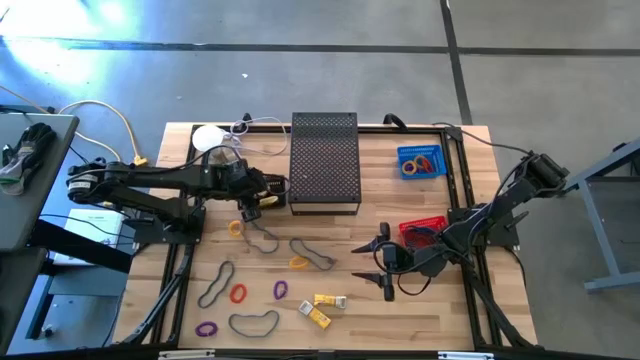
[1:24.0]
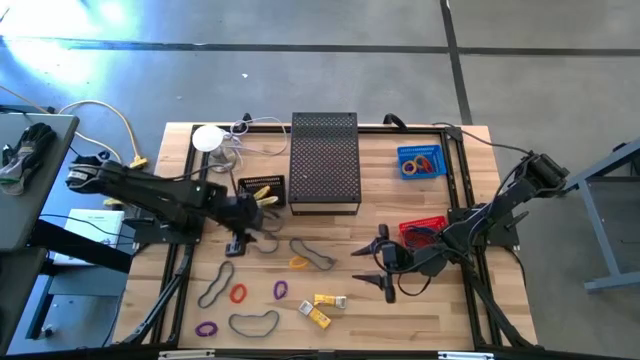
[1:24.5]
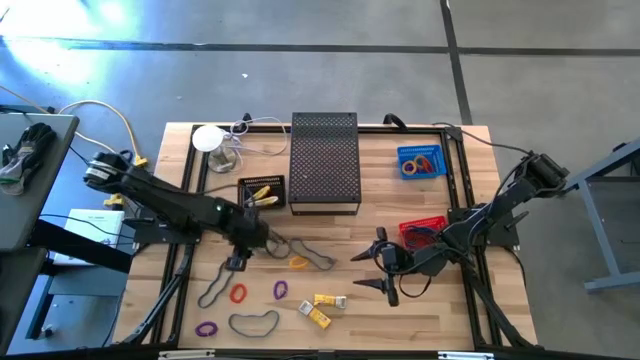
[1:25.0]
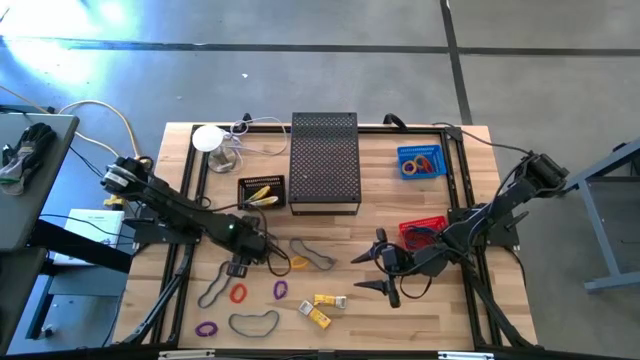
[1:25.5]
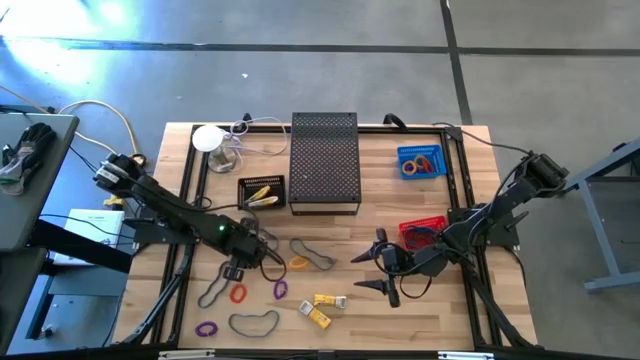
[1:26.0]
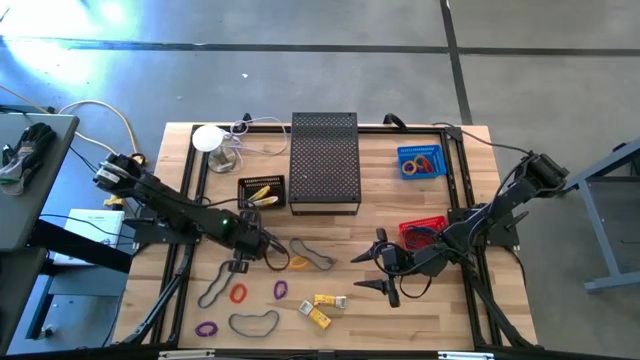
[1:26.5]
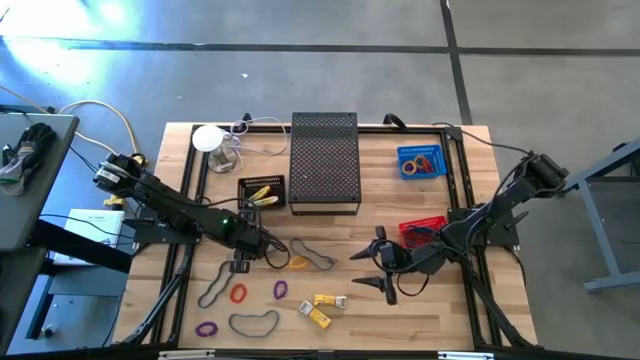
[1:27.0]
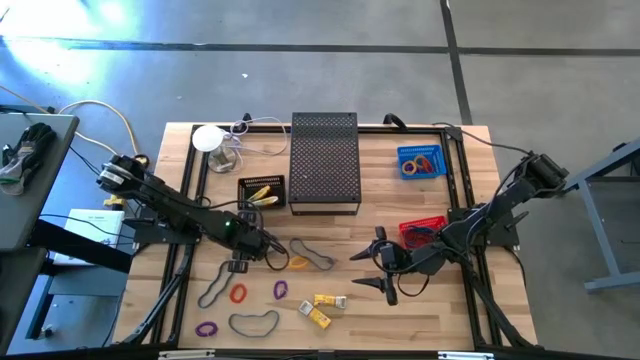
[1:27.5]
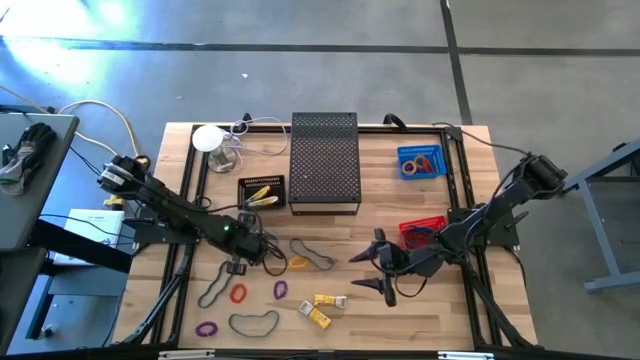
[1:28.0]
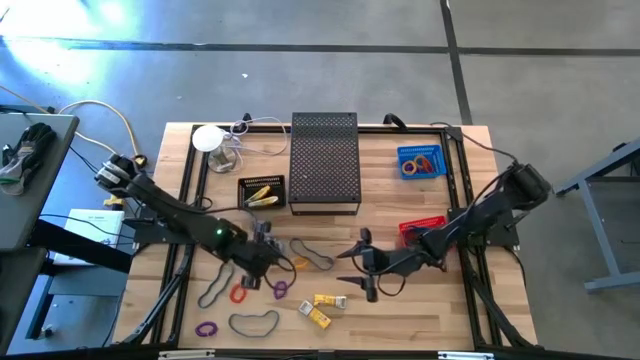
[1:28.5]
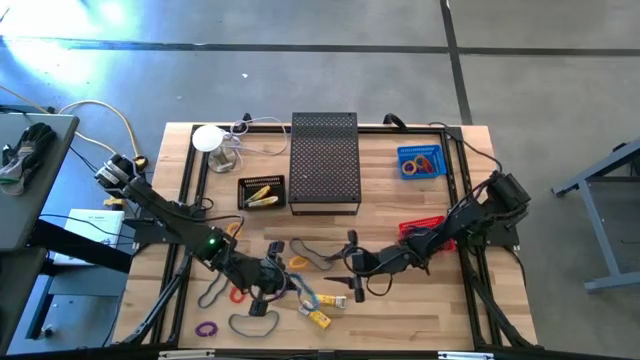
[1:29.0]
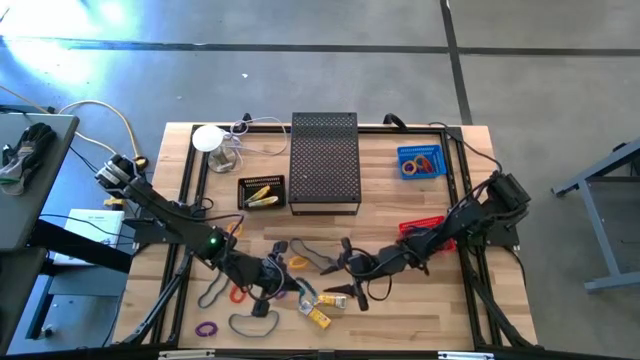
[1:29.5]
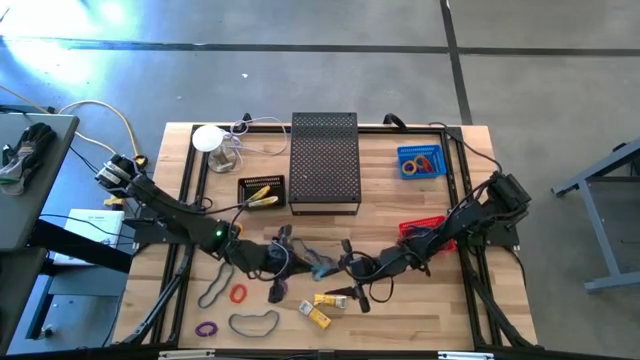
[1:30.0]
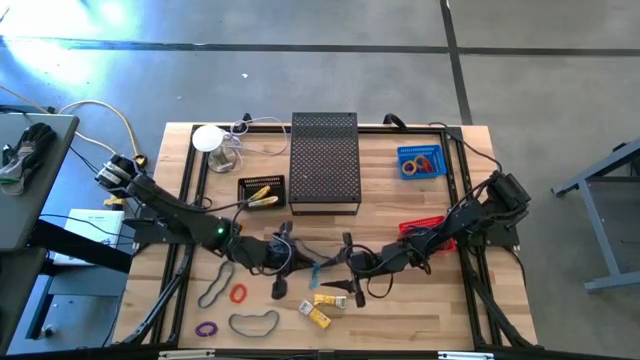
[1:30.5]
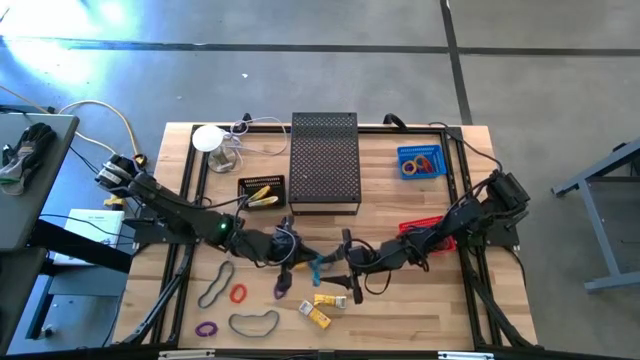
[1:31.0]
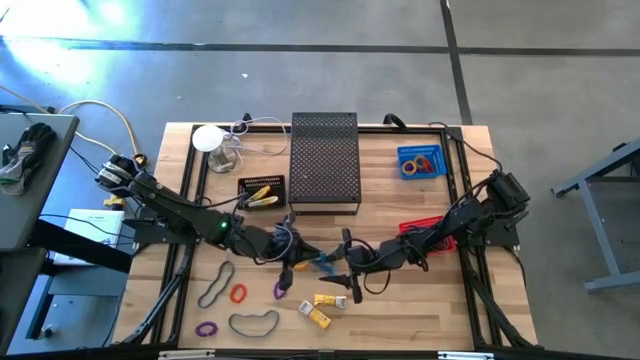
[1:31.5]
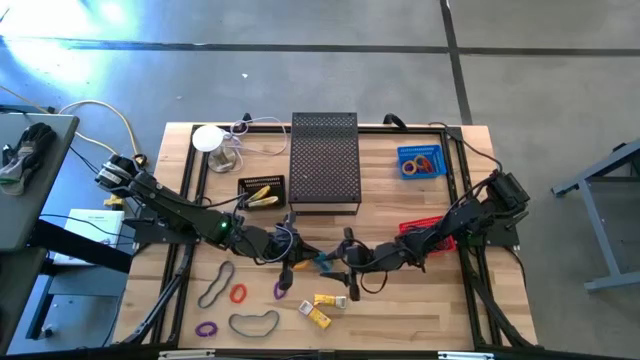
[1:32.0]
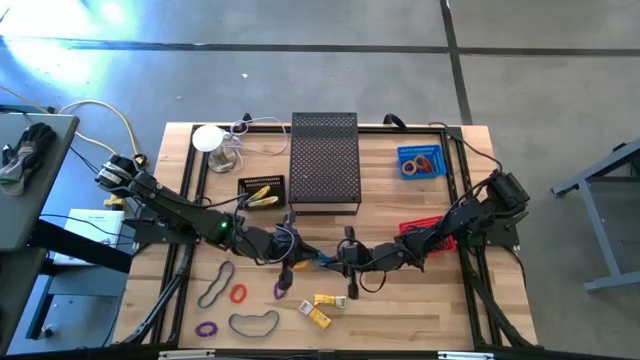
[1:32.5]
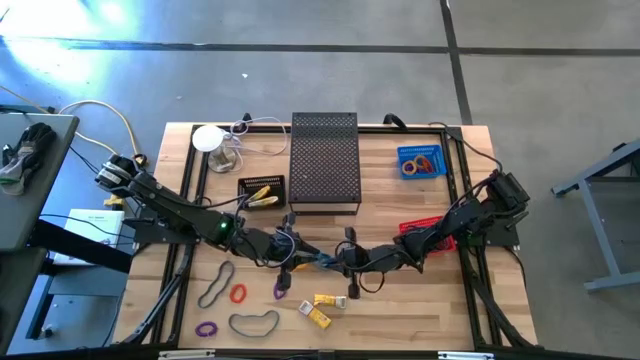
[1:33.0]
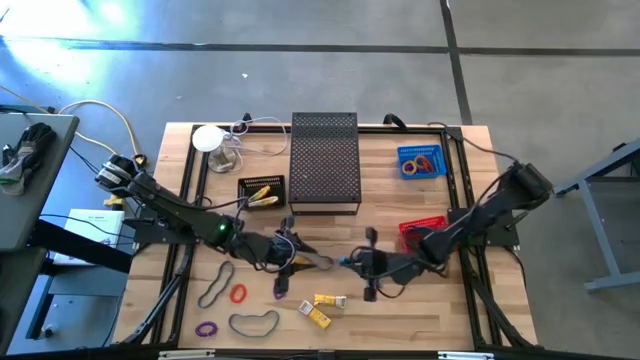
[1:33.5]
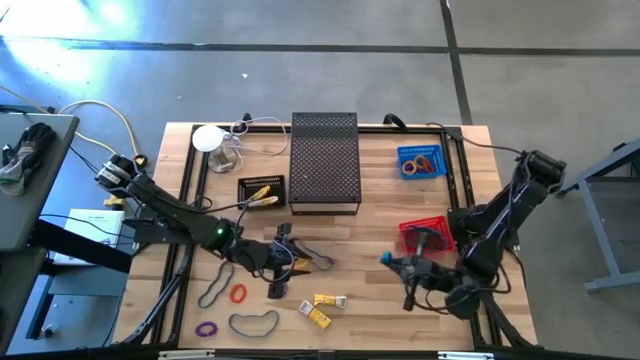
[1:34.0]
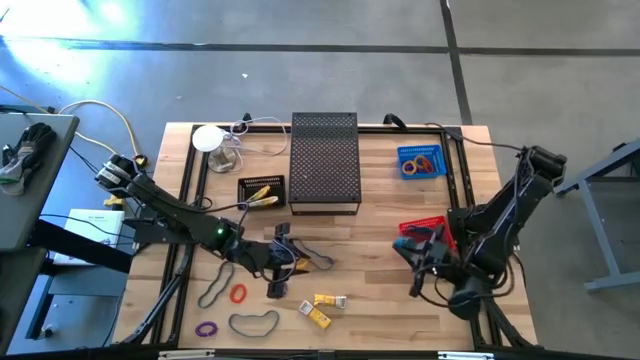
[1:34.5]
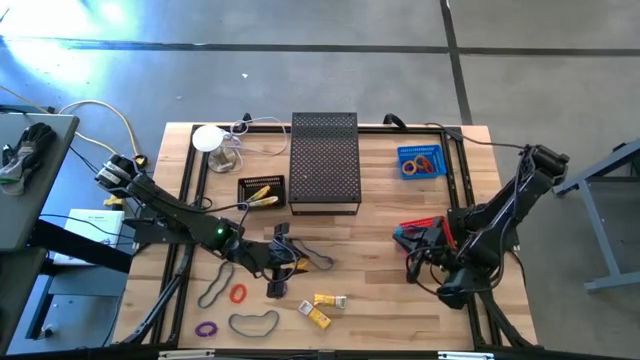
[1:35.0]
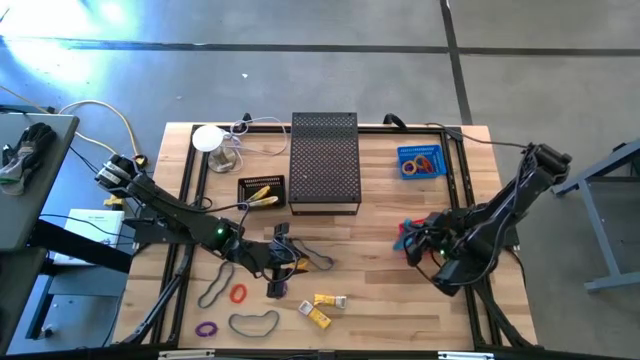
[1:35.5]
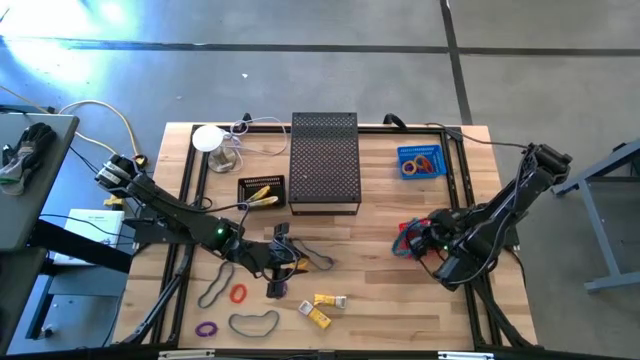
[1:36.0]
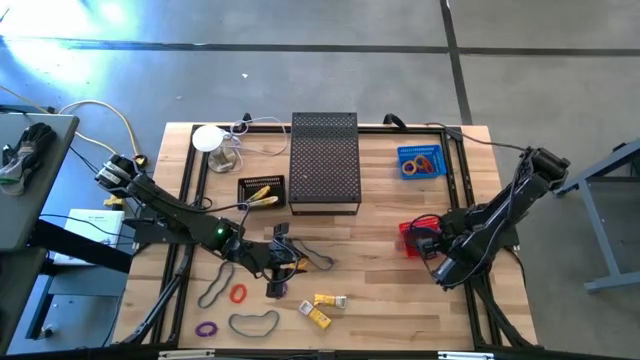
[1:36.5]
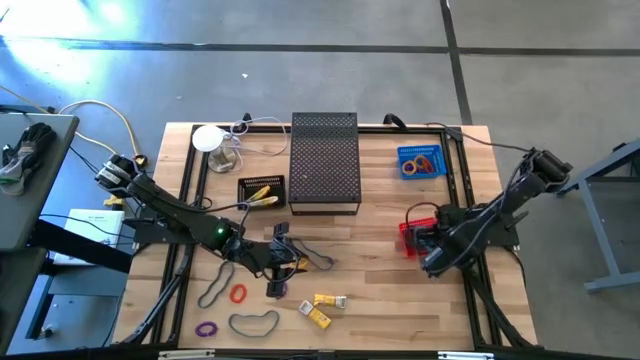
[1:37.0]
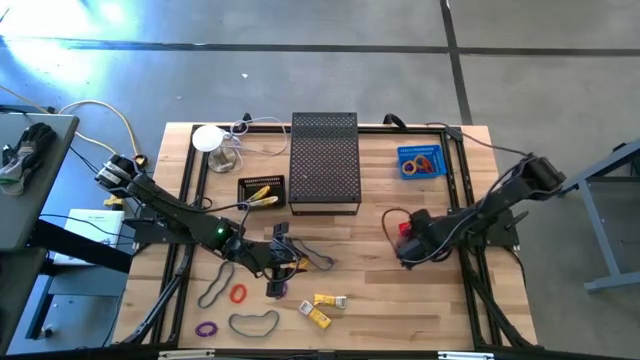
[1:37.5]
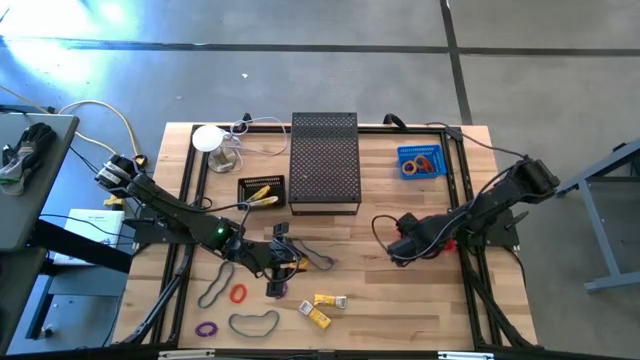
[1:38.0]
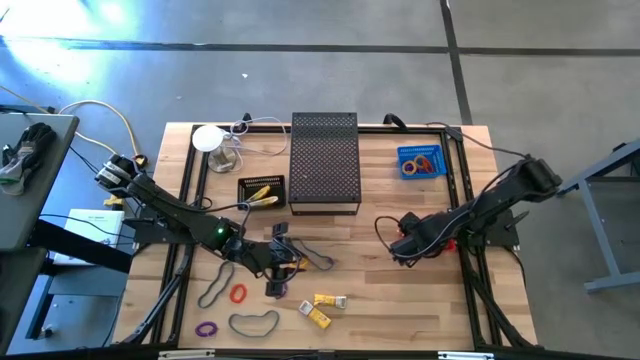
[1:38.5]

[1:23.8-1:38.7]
Task: Pick & Place Office Desk Supplies
Put the blue rubber band into the red bin

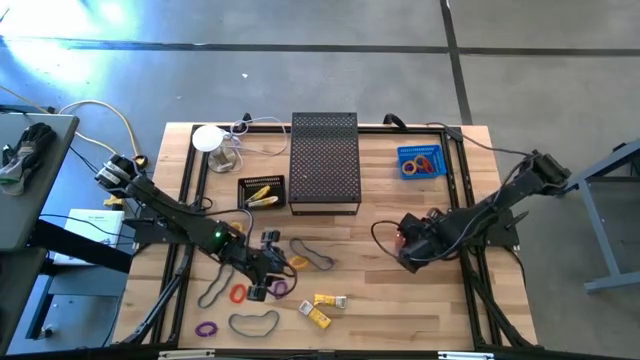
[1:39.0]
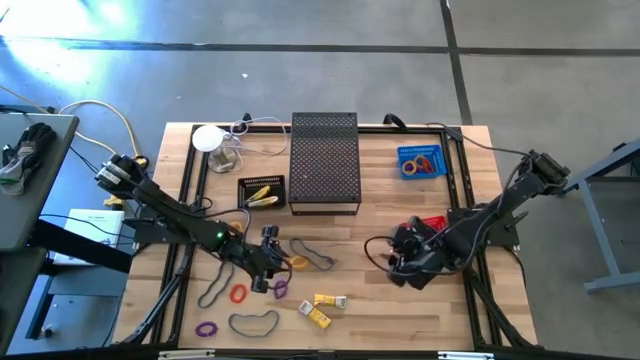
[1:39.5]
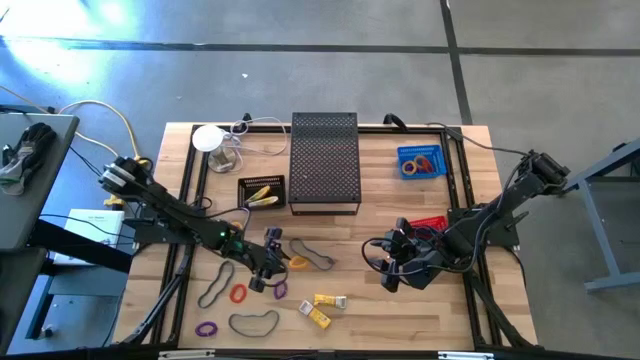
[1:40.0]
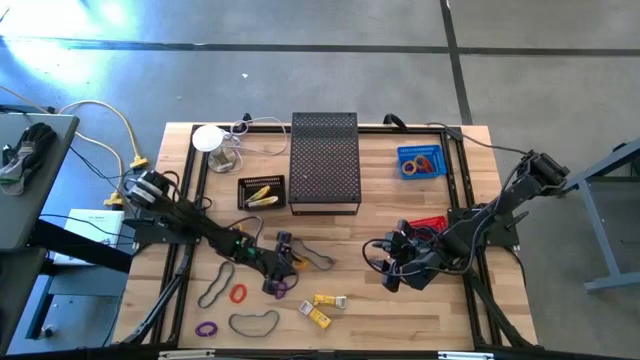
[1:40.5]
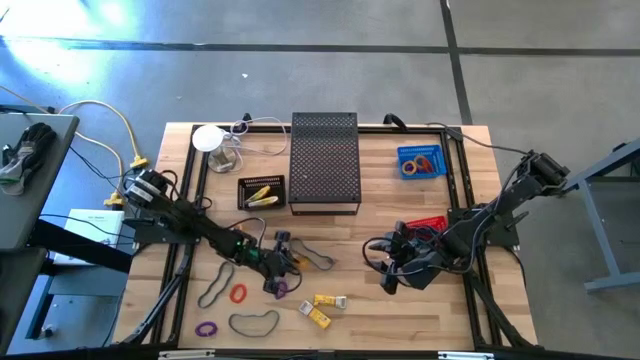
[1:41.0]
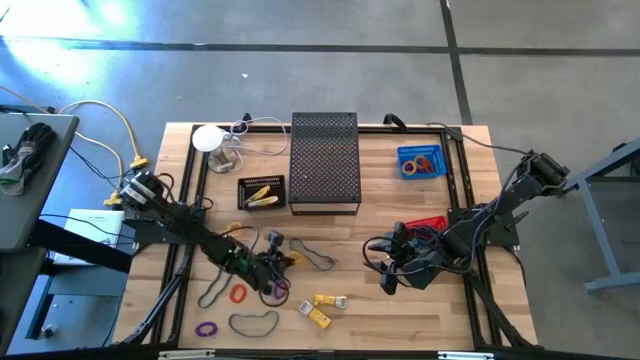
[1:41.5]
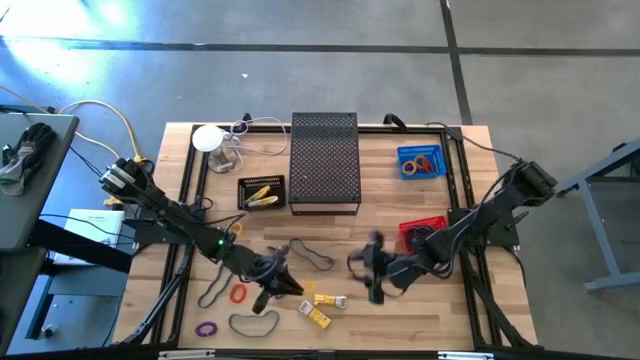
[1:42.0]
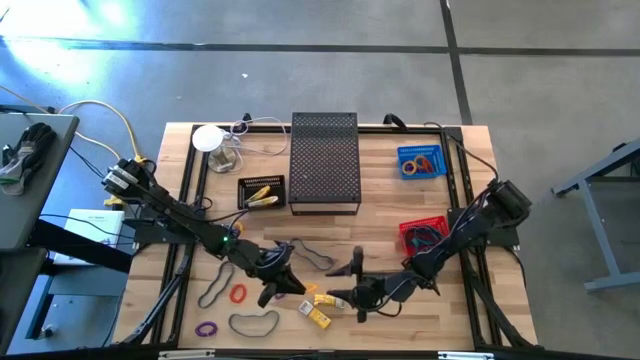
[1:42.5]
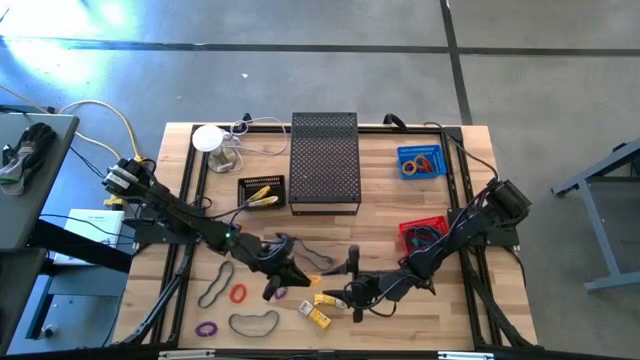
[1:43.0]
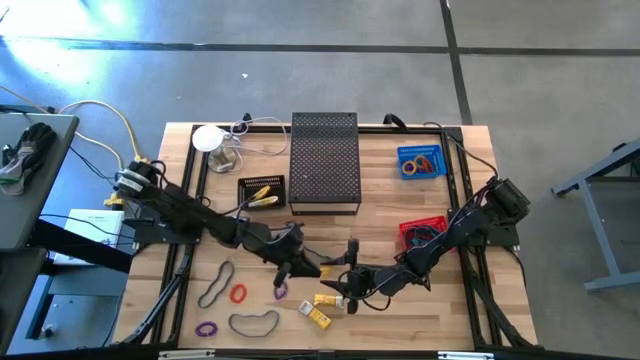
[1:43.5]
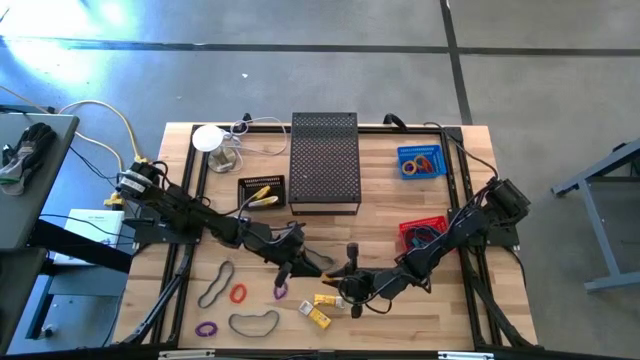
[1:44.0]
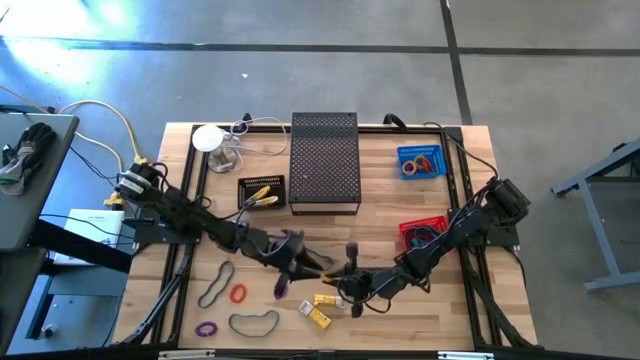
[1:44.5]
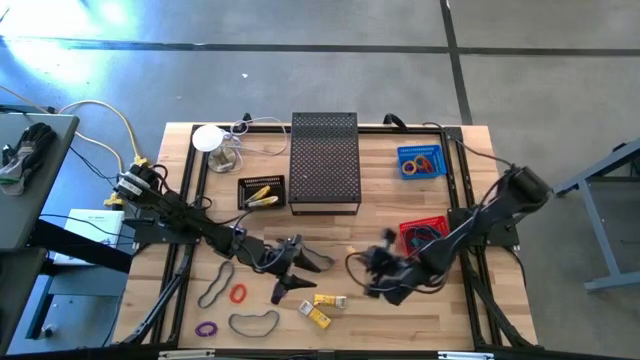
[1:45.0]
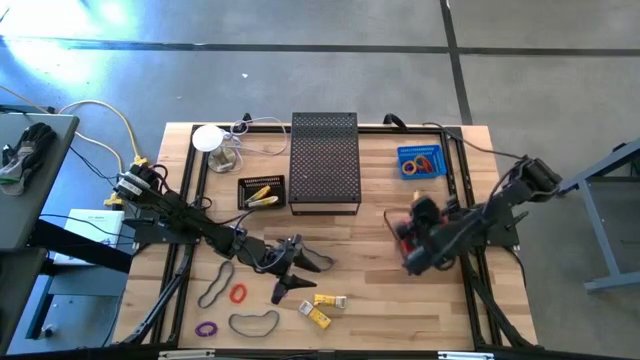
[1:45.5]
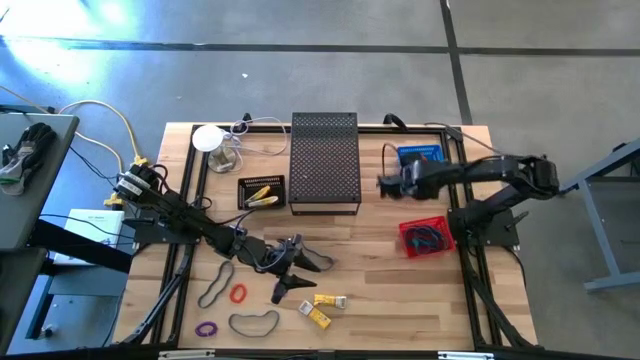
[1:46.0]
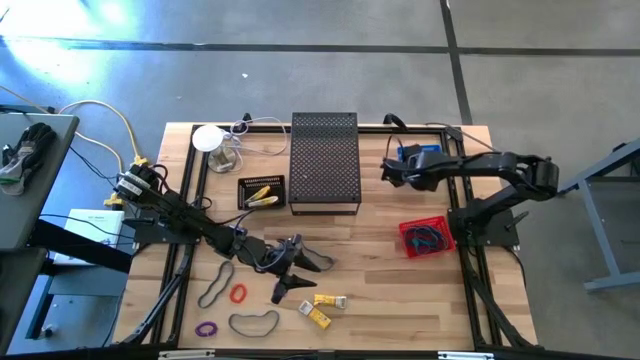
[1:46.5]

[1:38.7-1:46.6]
Put the yellow spring keychain into the blue bin
